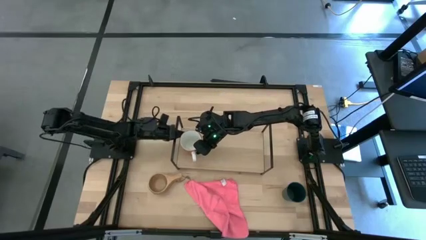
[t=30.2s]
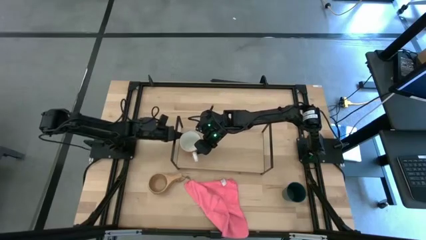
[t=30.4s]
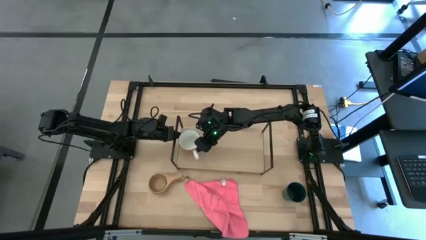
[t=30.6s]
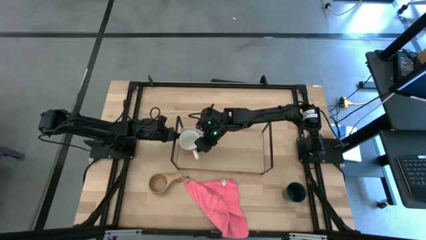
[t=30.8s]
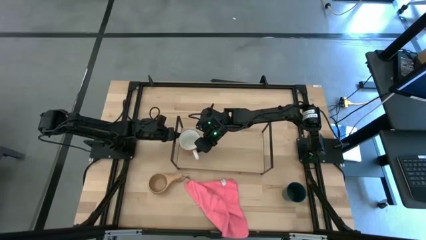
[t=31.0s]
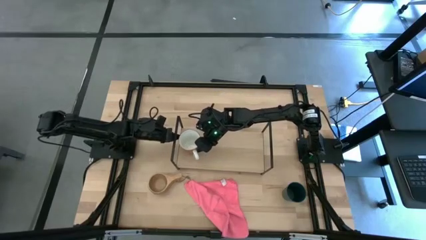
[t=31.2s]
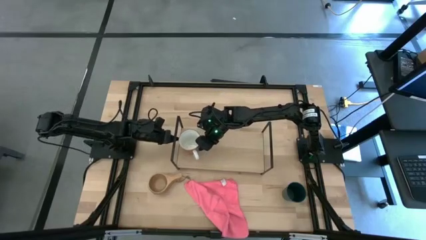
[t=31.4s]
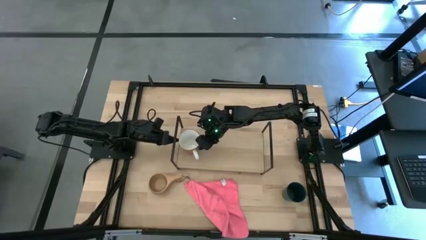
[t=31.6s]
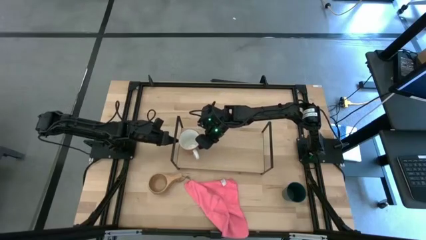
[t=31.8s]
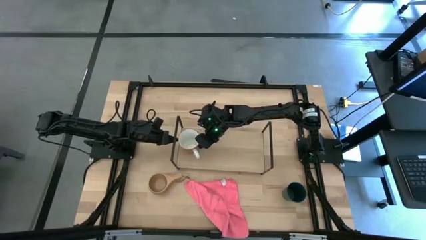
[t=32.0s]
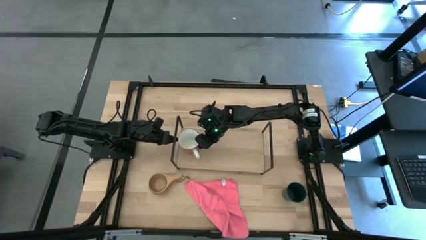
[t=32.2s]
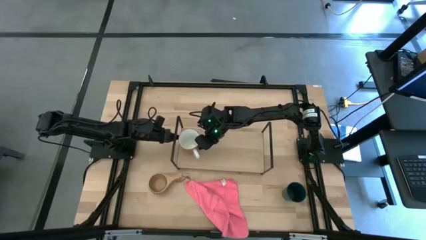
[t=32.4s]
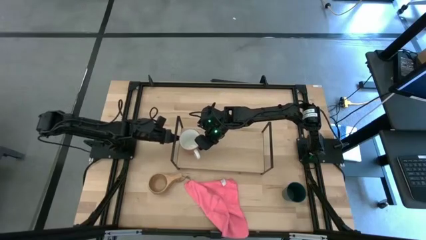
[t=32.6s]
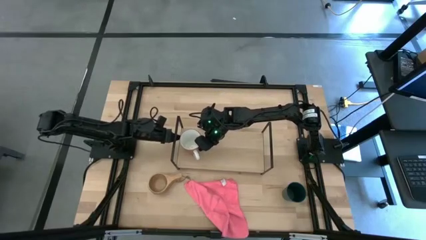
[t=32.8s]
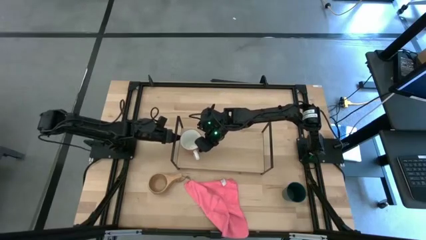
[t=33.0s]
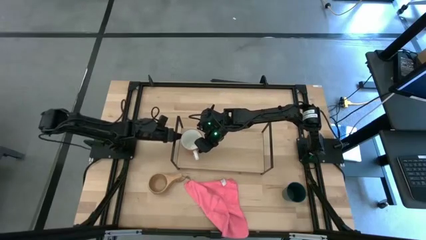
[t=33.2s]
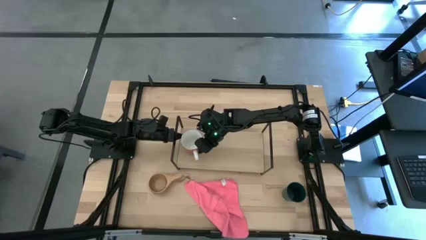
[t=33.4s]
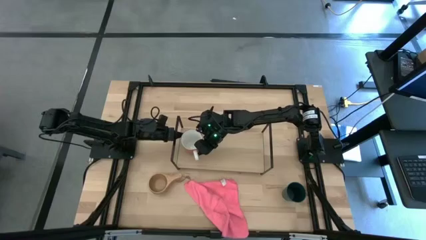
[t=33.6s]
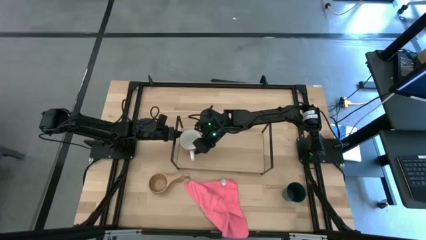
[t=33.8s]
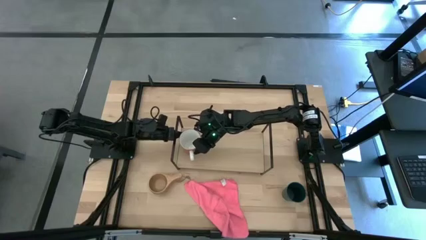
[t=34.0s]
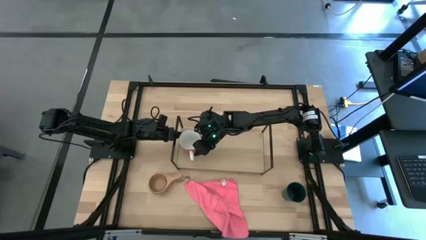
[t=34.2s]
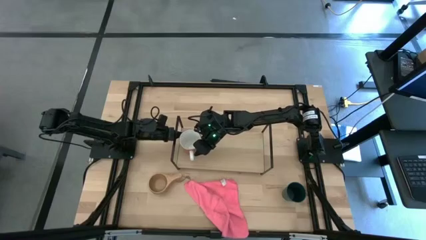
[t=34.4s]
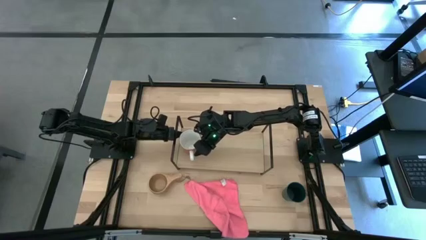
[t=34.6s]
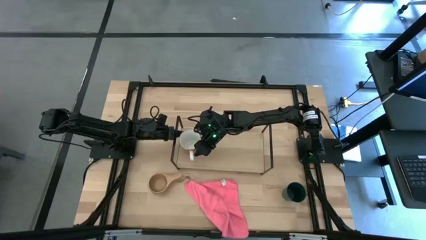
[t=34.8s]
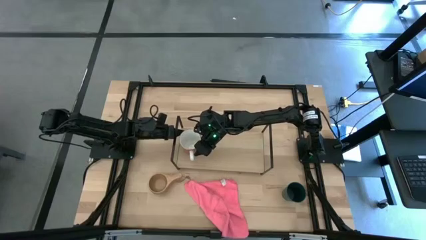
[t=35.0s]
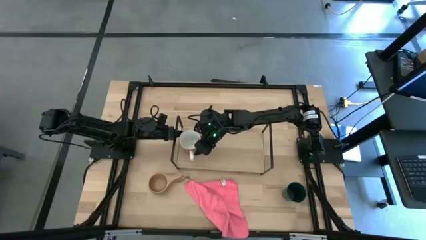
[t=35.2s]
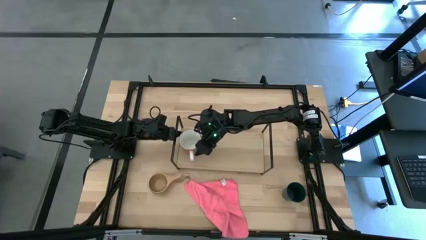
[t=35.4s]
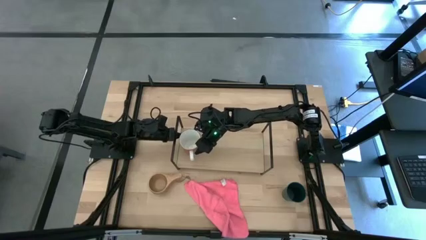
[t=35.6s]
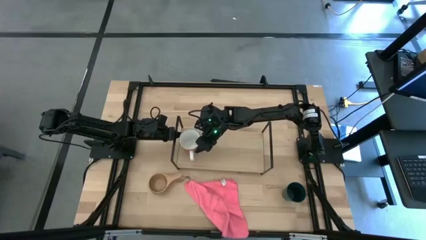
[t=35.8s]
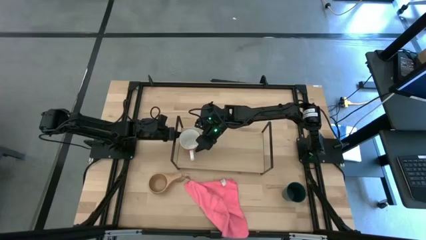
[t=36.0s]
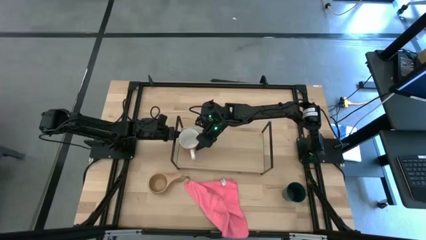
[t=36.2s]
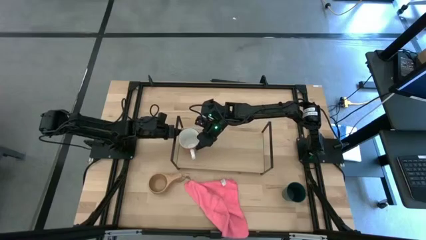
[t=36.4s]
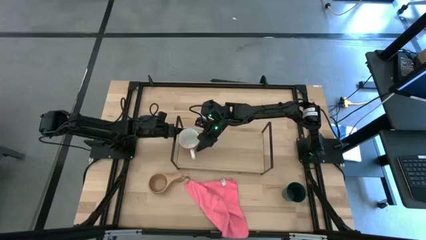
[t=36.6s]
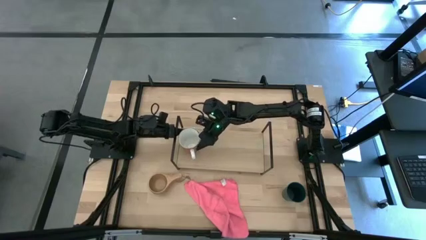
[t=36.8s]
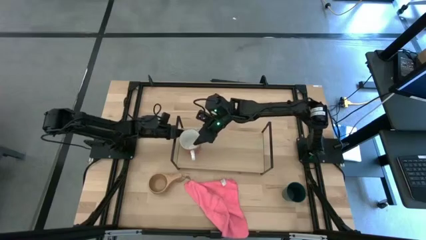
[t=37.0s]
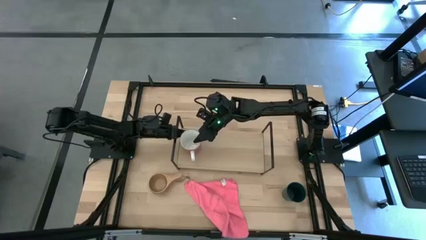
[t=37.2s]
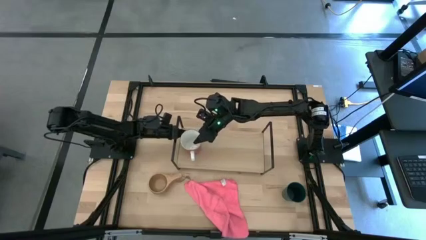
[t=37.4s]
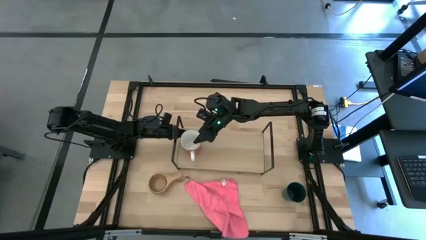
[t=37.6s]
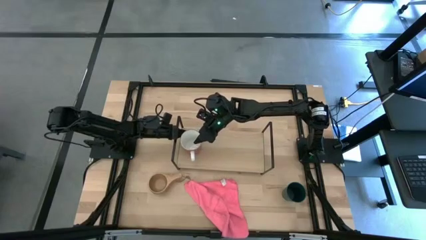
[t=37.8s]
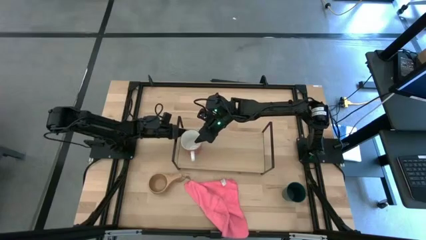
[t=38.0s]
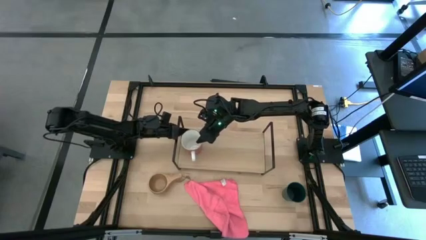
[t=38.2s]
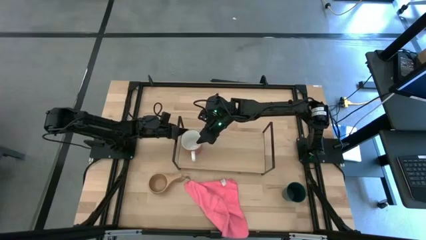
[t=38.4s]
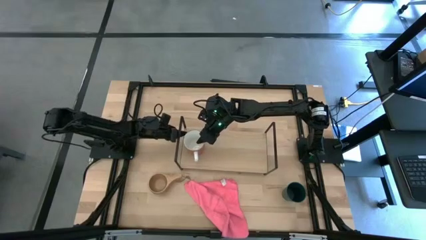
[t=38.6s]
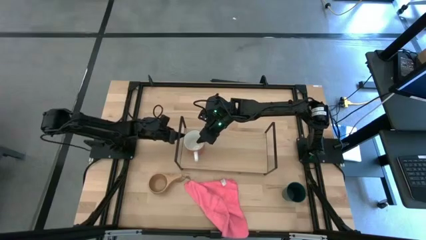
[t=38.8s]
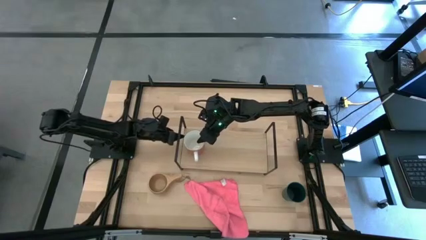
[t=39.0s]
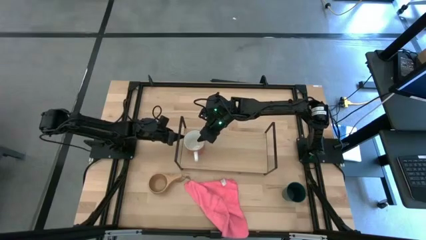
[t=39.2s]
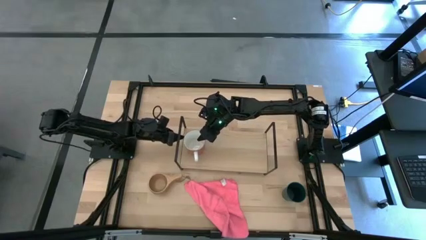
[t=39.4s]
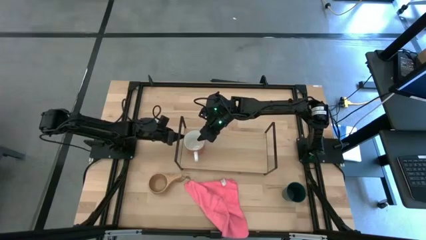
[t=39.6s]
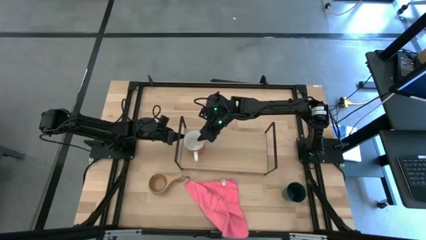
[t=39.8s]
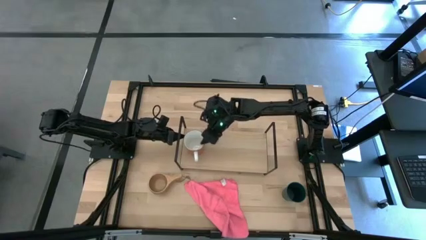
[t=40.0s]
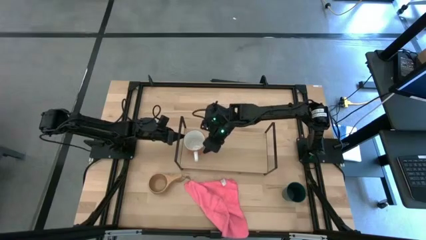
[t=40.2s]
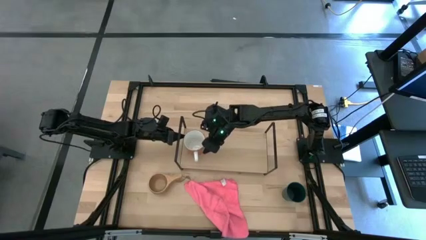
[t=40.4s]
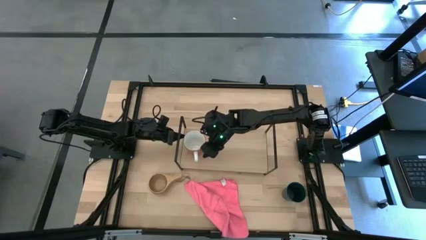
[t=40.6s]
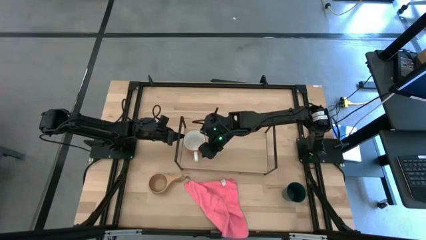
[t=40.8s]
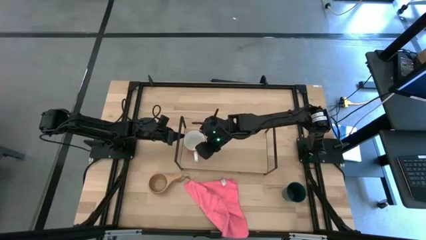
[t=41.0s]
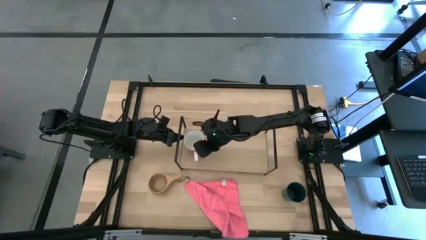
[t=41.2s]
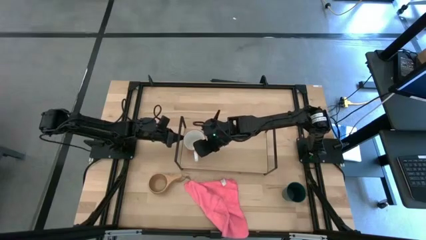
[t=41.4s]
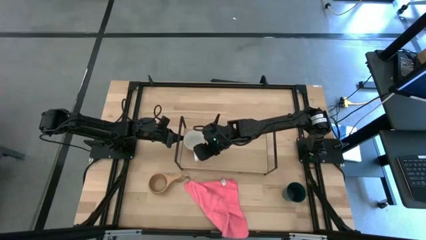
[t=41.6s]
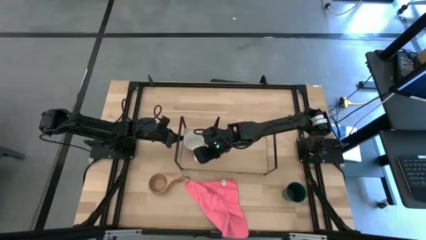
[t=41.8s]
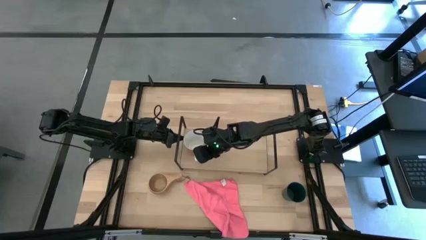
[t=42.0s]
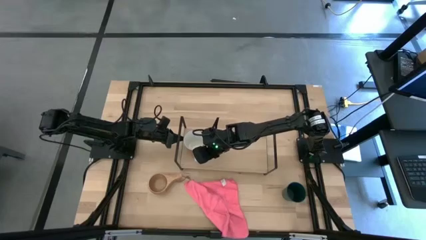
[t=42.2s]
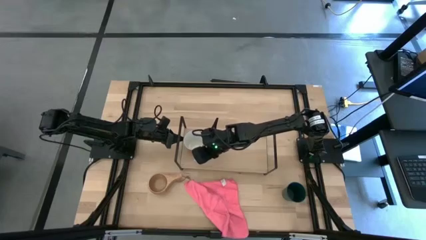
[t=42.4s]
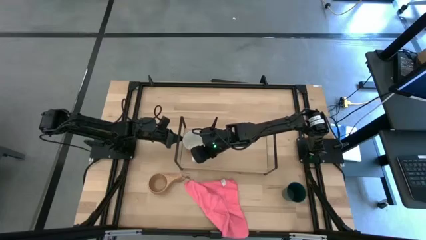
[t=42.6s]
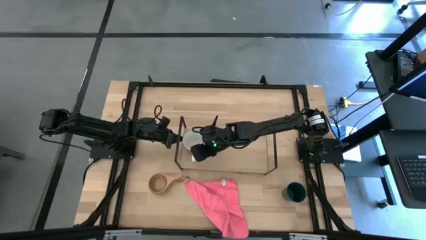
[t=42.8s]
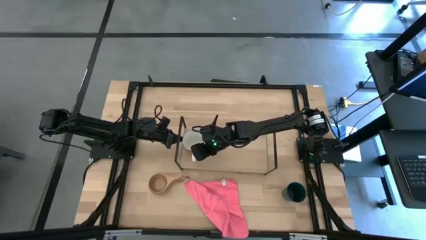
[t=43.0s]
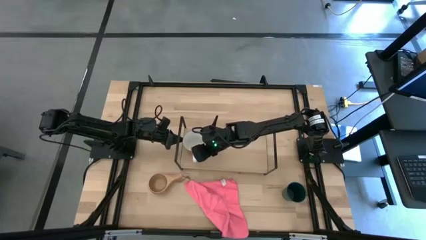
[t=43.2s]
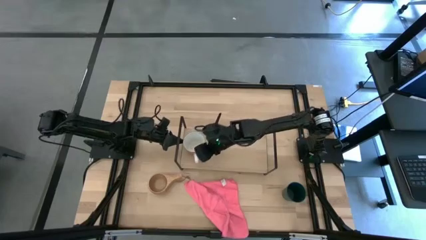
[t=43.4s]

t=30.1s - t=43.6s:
Task: Stack small to large cups/mugs on shelf
Adjust the orange mug on the shelf
